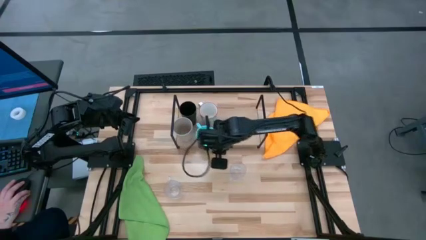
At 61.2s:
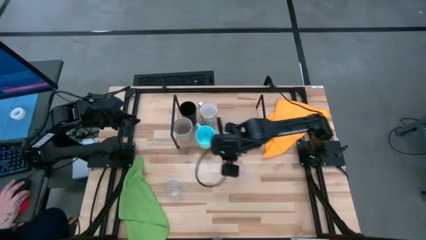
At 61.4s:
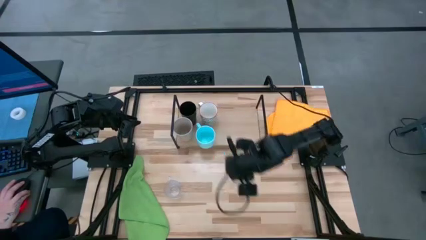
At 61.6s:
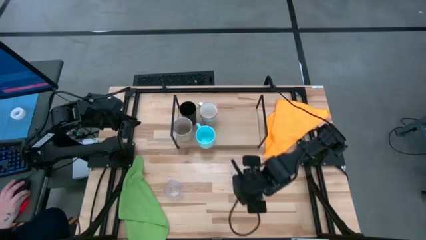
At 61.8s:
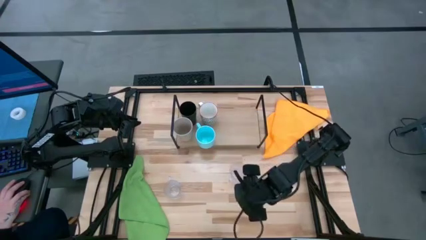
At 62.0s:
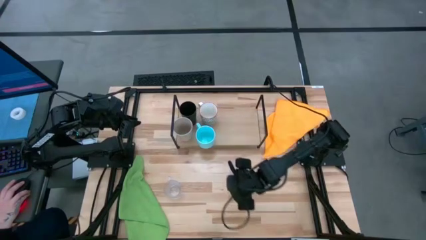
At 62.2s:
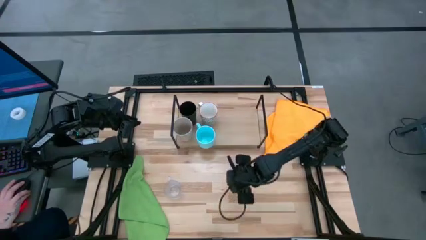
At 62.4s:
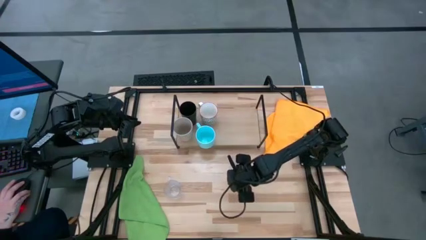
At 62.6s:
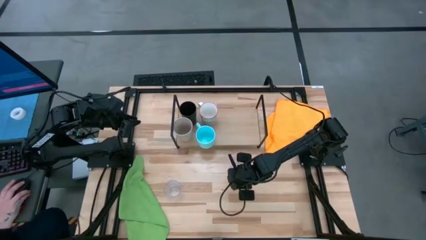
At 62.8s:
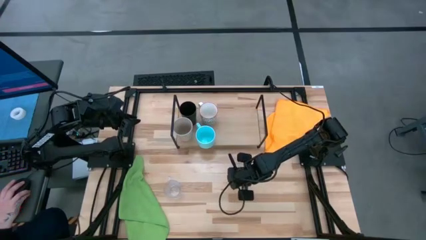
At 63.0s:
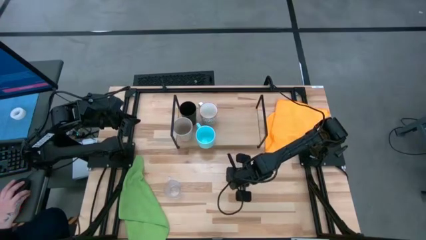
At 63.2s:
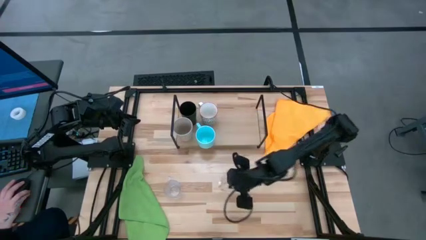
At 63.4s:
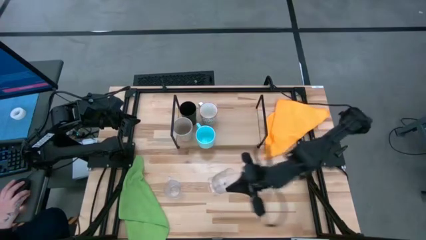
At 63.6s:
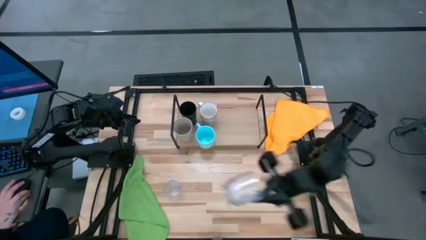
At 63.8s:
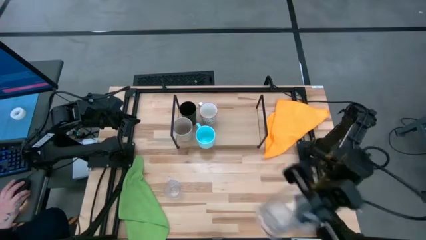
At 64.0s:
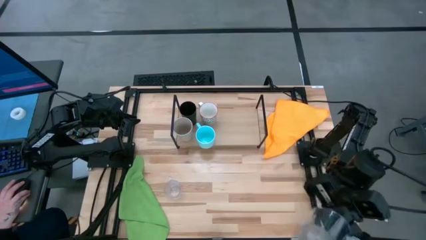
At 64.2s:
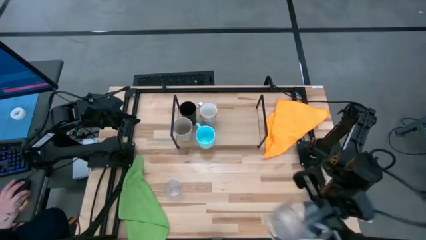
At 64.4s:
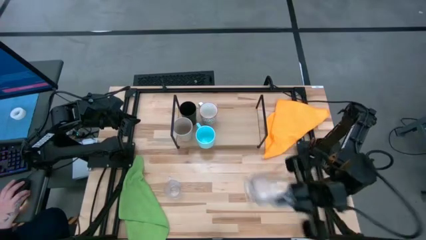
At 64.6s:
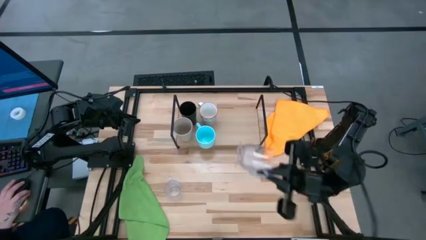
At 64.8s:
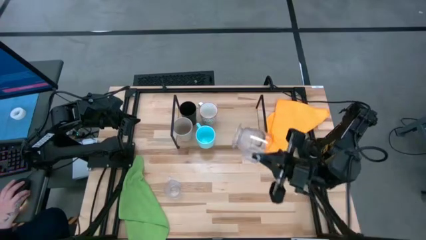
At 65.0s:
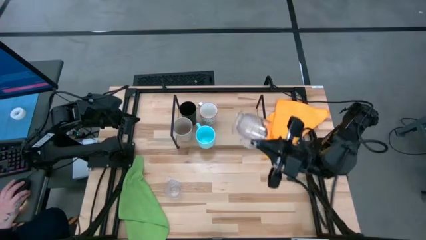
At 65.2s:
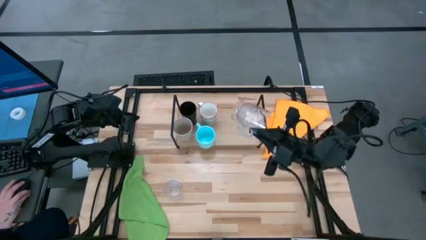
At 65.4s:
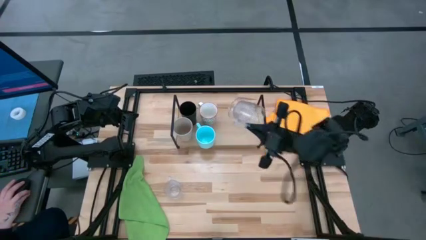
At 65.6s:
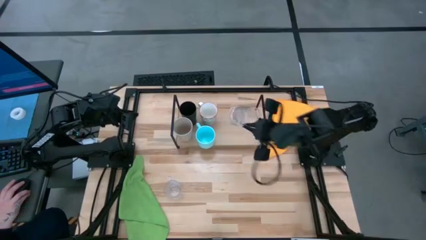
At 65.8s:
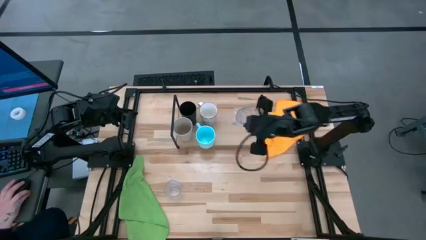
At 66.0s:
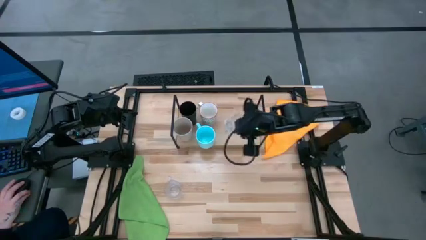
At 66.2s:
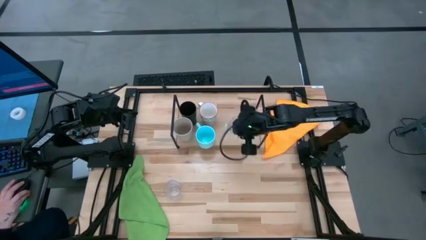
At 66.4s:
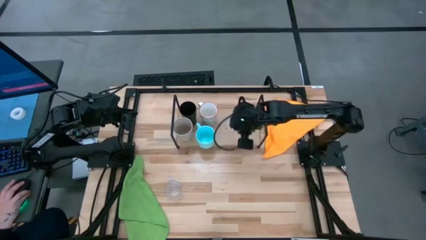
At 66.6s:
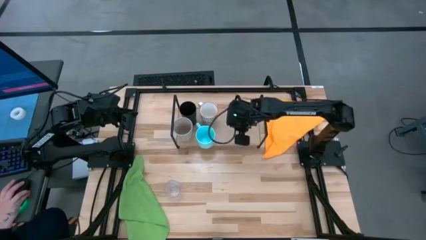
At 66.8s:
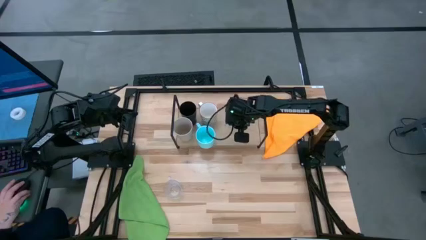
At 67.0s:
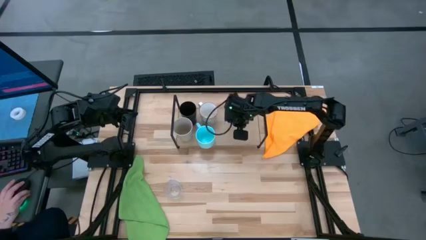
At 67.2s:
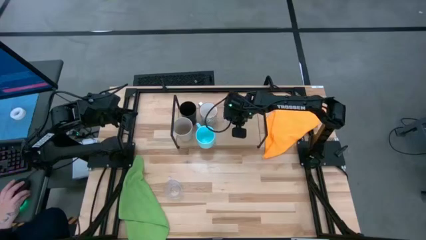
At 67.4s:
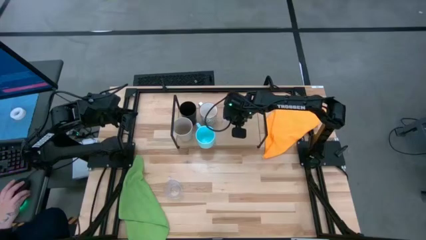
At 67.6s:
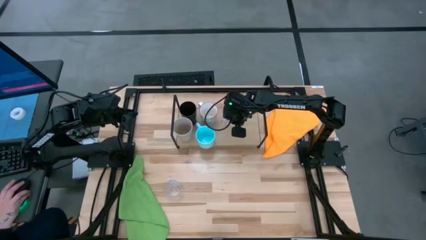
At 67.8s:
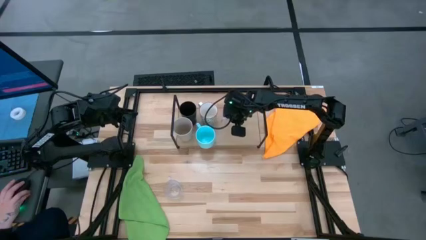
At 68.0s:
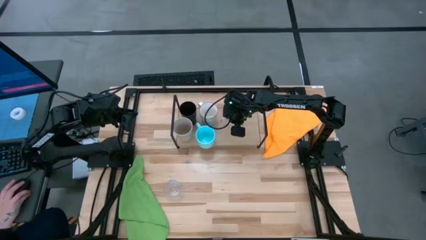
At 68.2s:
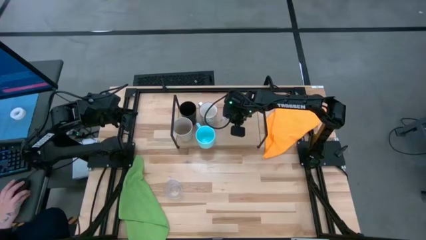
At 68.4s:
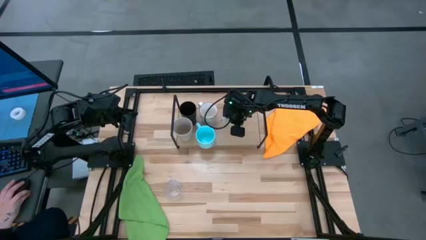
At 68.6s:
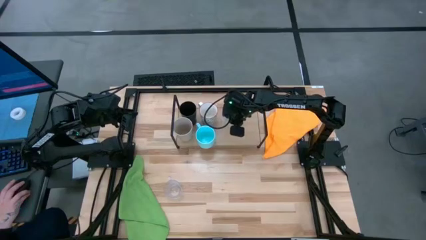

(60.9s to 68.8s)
Task: Stack small to large cups/mugs on shelf
Put the transparent mug on the shelf

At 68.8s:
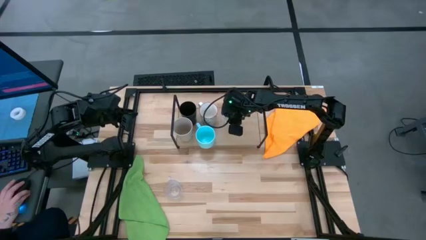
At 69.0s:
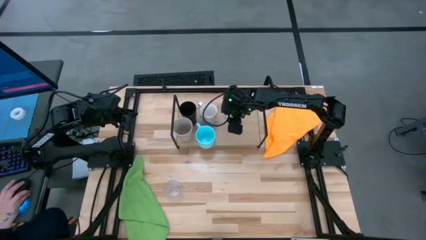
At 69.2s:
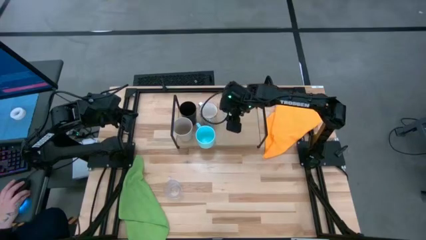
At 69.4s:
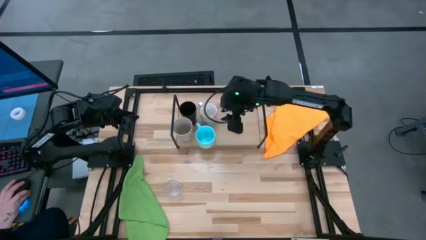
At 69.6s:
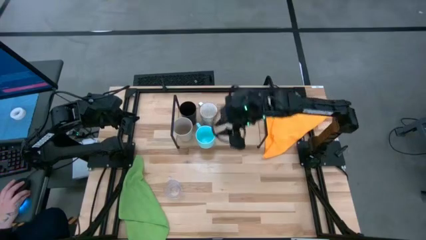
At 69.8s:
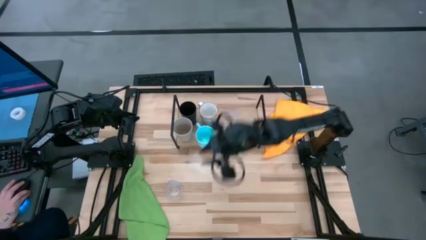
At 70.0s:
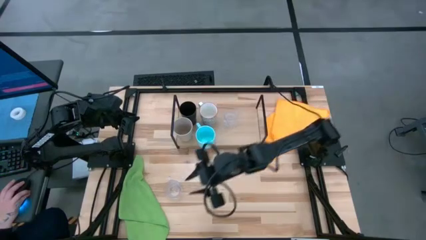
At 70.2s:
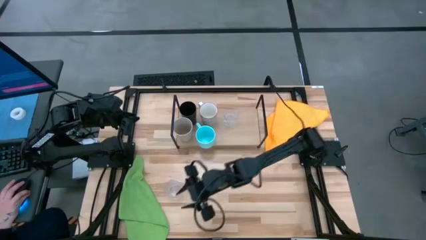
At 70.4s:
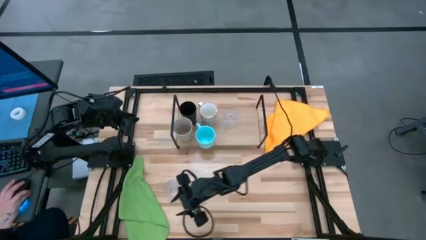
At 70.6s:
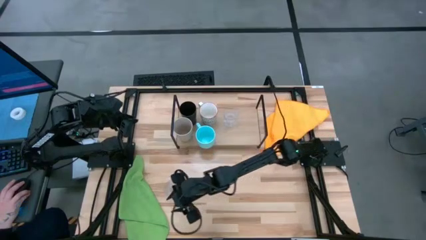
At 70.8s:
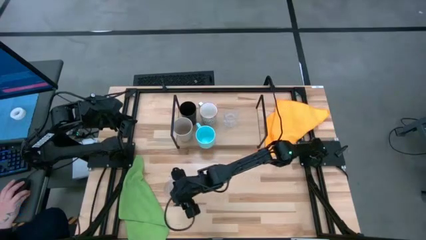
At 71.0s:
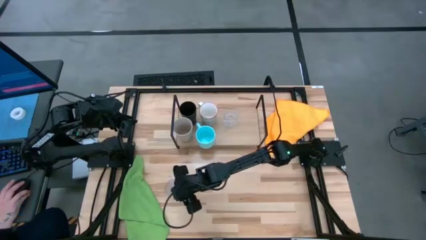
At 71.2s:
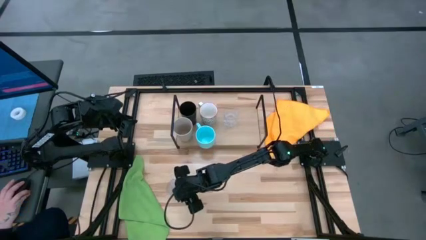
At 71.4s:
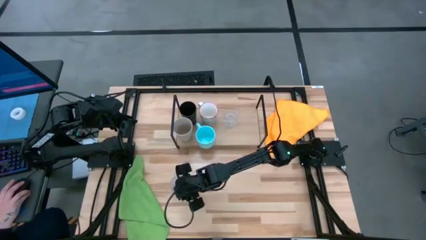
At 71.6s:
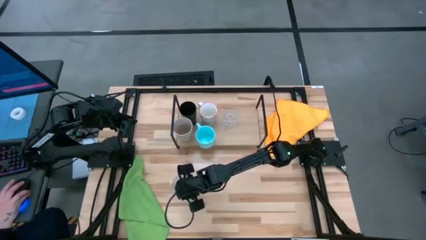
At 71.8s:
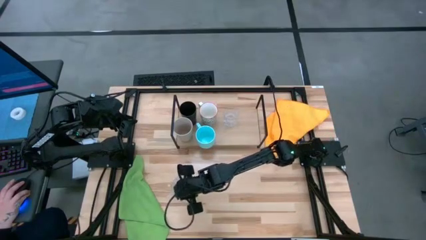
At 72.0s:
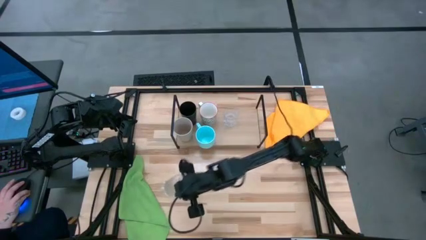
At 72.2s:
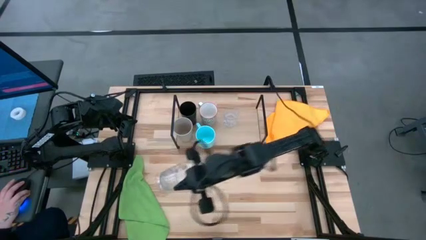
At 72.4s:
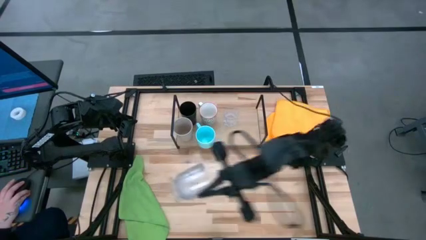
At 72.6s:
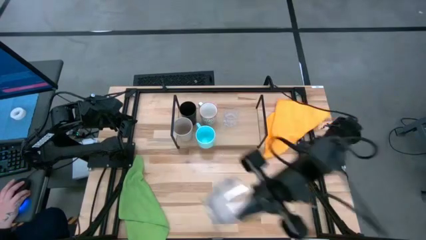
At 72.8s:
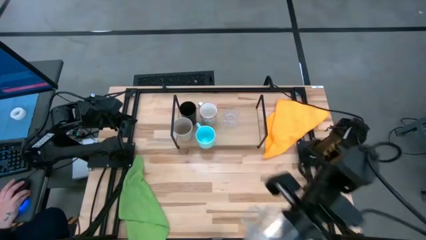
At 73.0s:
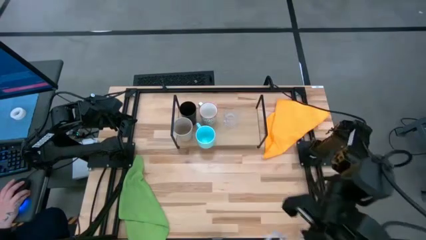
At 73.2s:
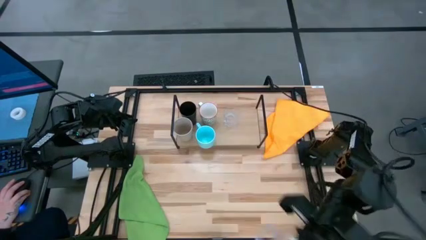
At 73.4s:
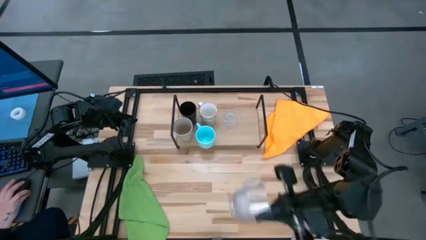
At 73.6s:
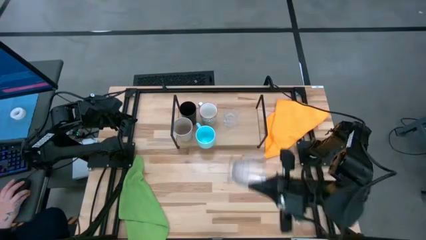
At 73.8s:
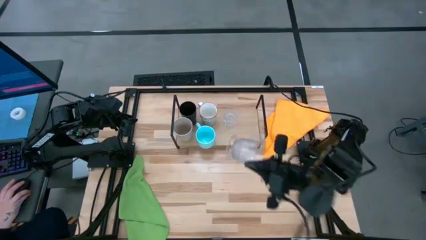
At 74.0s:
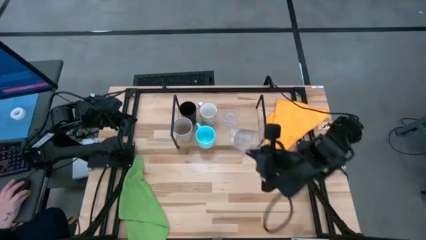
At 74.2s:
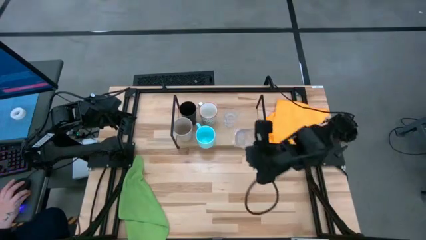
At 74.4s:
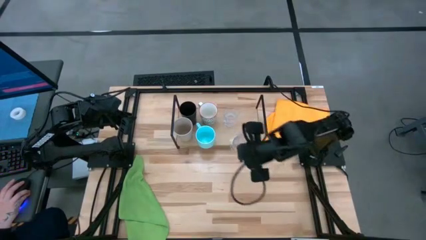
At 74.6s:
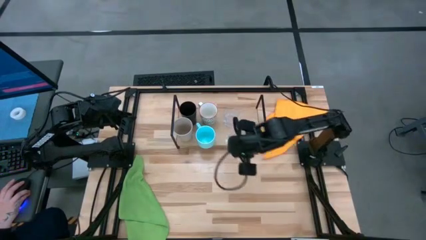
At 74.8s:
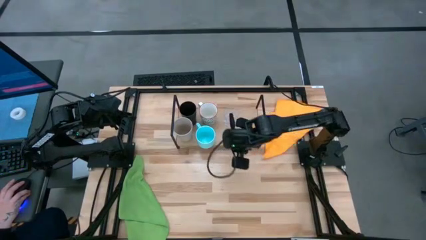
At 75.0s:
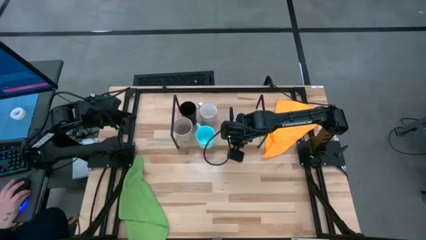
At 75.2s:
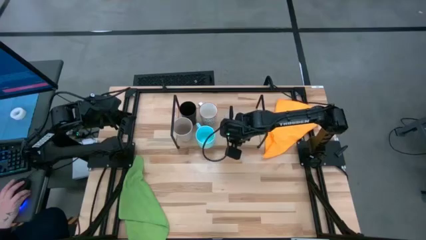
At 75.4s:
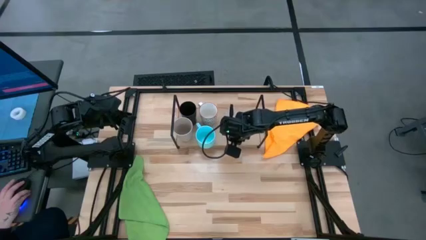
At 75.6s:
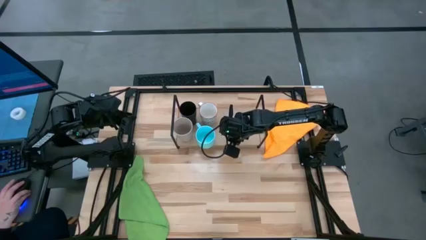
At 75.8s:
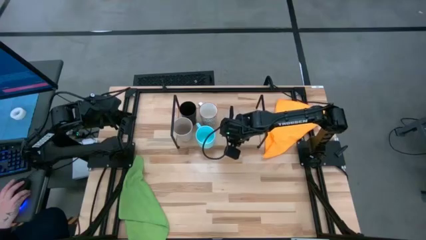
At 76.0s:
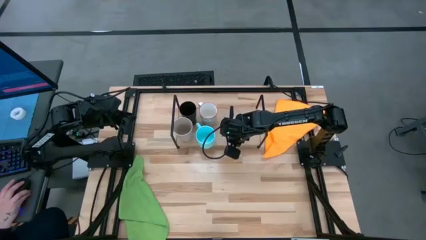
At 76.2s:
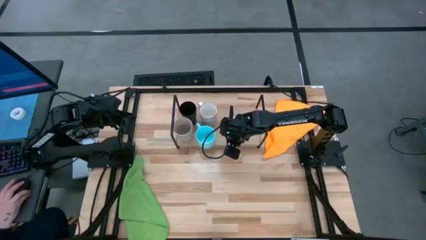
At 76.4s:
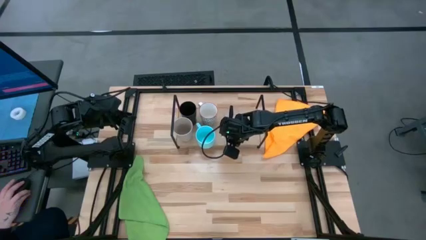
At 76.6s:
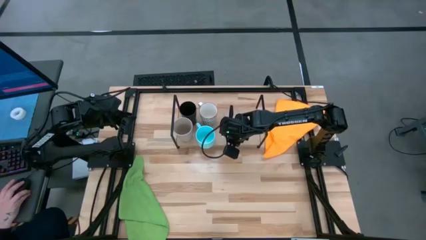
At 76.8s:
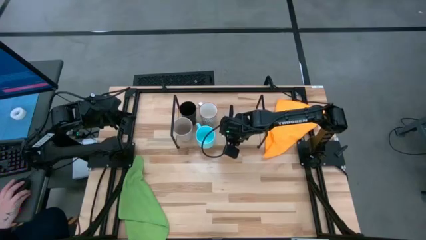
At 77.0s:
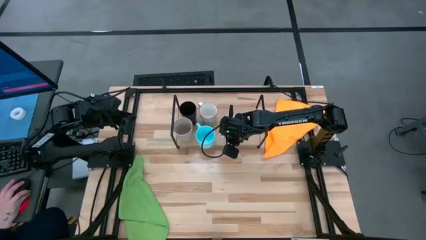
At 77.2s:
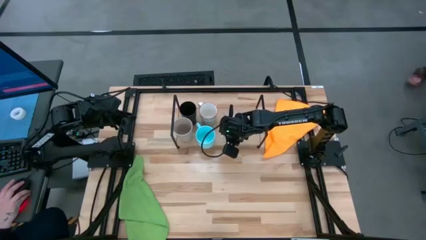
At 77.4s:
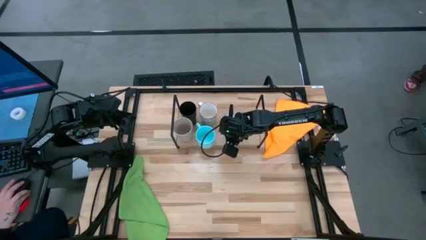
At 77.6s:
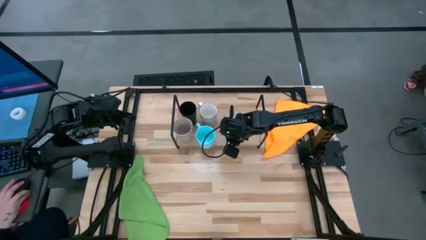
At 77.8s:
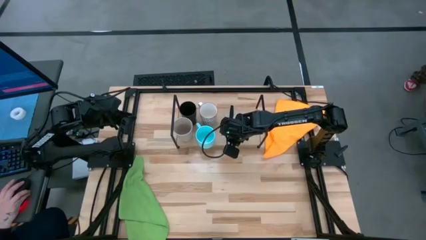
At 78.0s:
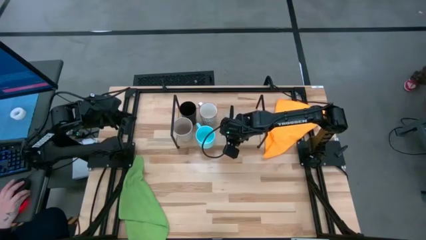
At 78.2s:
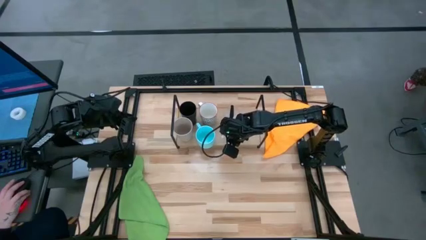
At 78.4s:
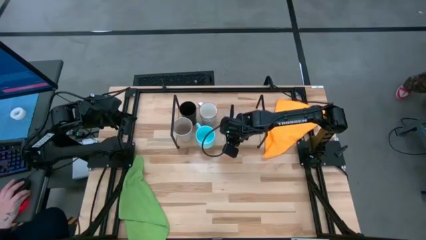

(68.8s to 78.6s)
Align the transparent mug with the other transparent mug
